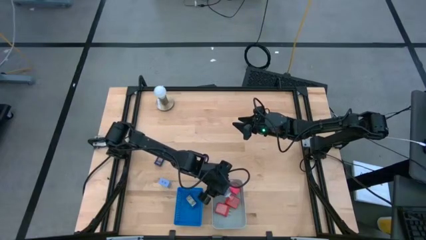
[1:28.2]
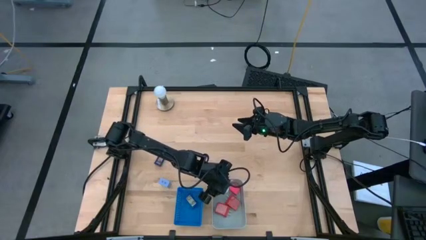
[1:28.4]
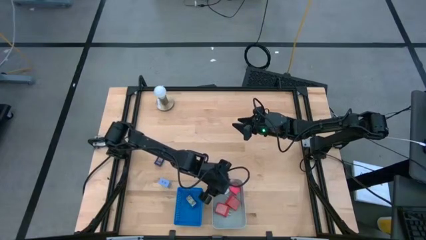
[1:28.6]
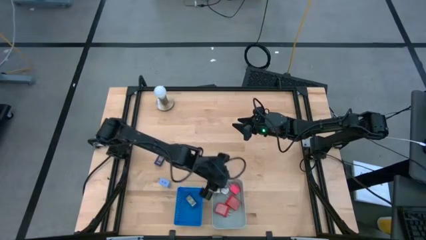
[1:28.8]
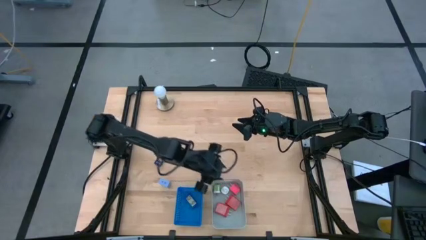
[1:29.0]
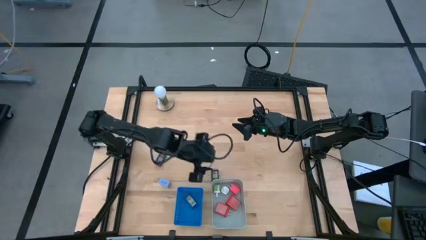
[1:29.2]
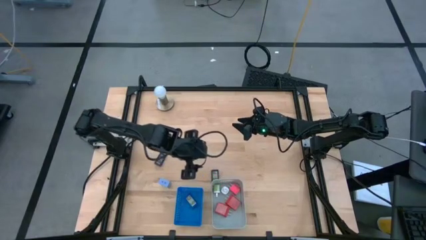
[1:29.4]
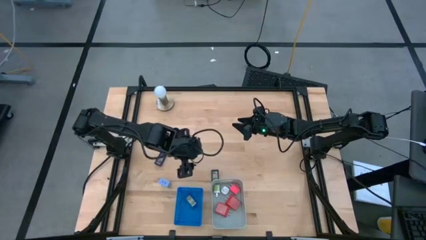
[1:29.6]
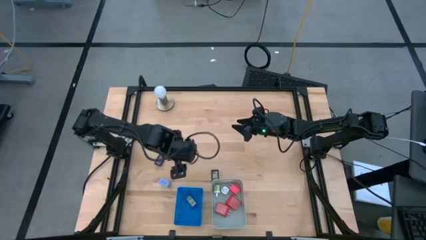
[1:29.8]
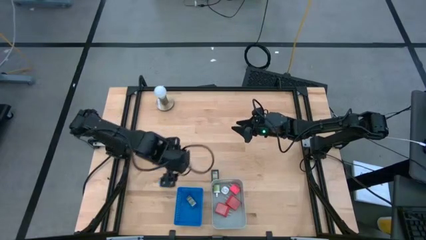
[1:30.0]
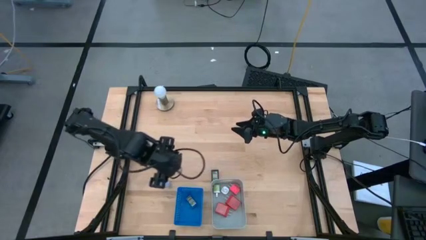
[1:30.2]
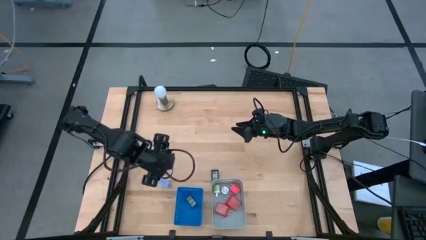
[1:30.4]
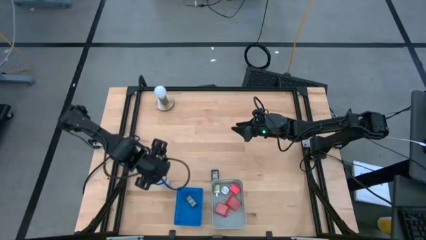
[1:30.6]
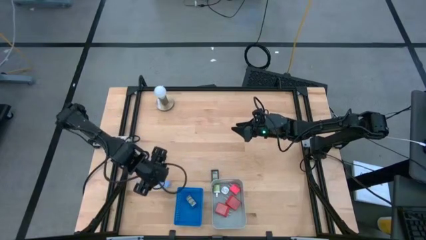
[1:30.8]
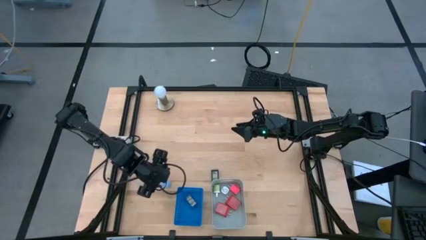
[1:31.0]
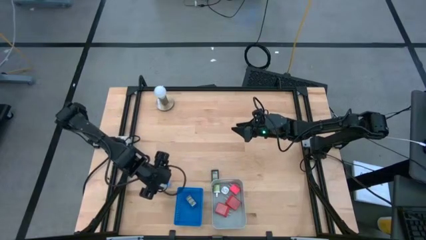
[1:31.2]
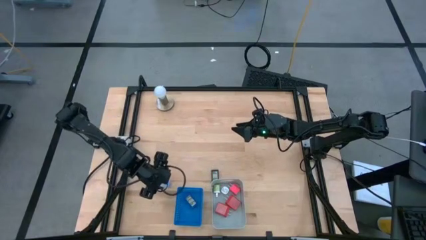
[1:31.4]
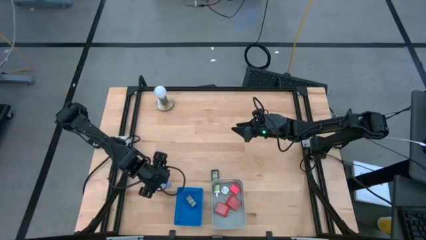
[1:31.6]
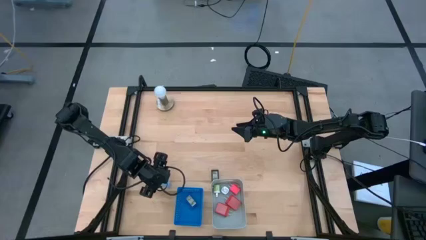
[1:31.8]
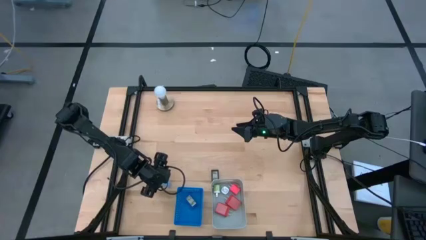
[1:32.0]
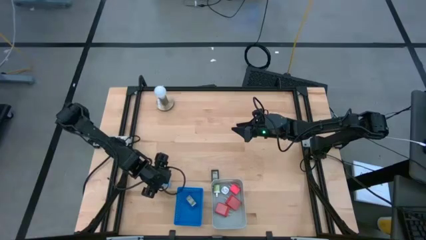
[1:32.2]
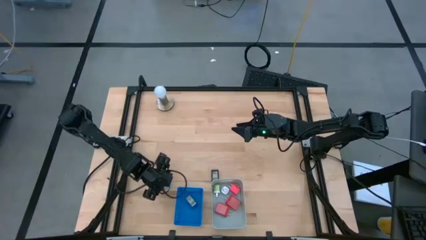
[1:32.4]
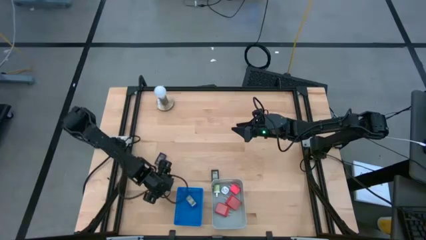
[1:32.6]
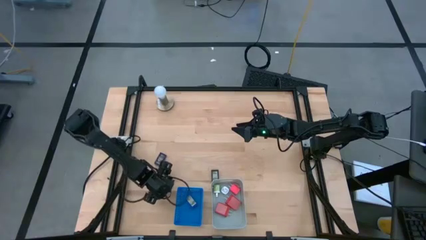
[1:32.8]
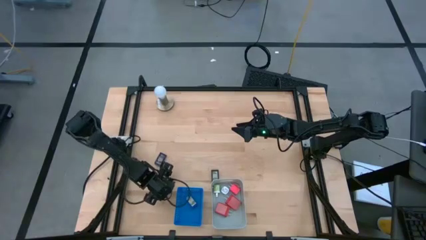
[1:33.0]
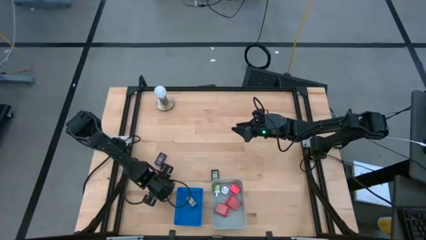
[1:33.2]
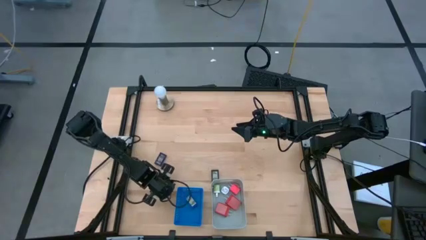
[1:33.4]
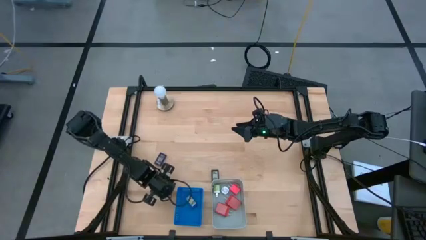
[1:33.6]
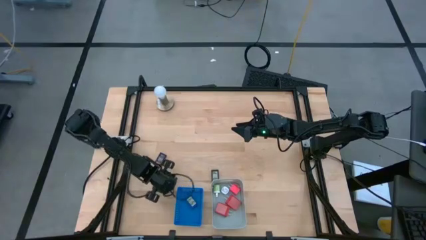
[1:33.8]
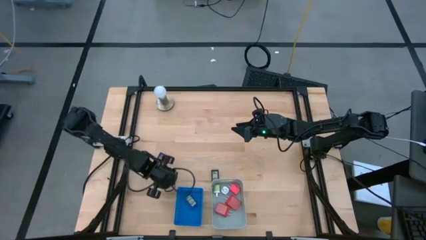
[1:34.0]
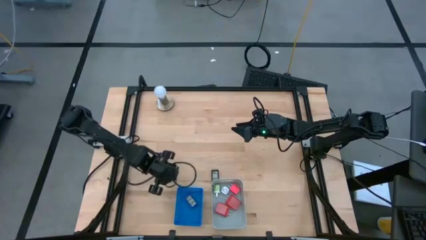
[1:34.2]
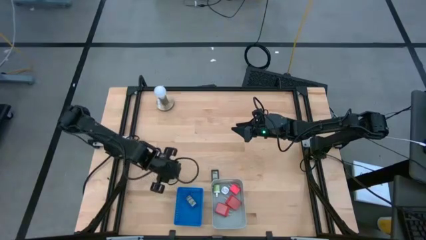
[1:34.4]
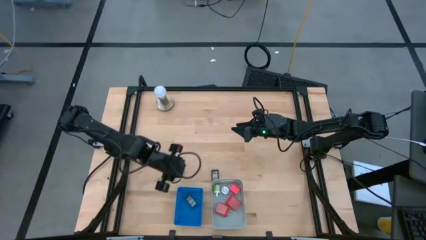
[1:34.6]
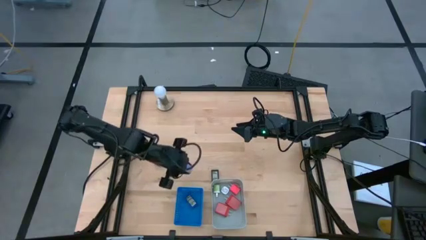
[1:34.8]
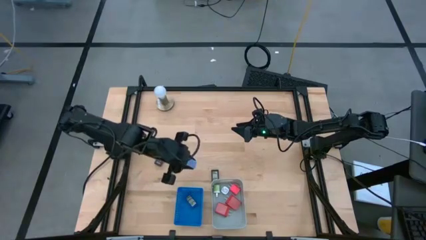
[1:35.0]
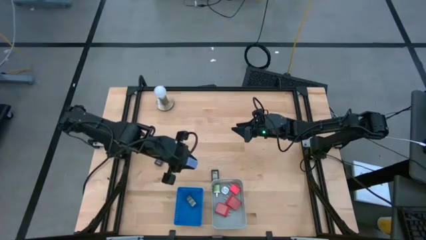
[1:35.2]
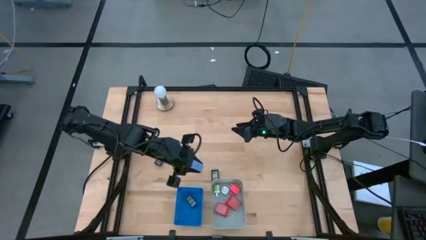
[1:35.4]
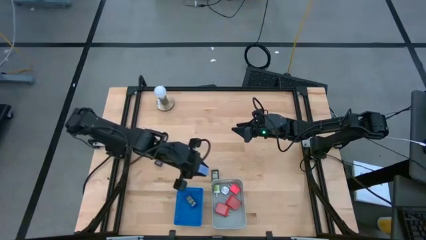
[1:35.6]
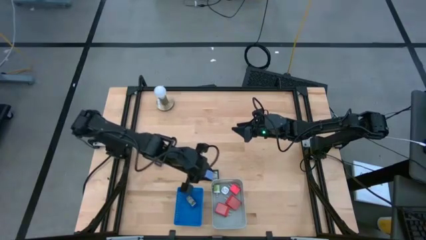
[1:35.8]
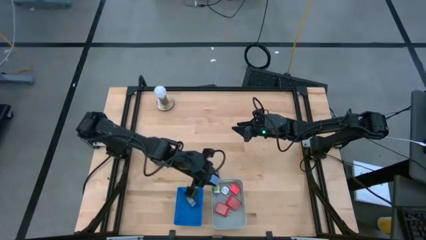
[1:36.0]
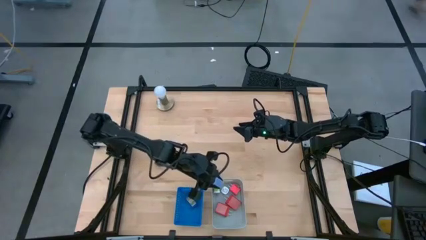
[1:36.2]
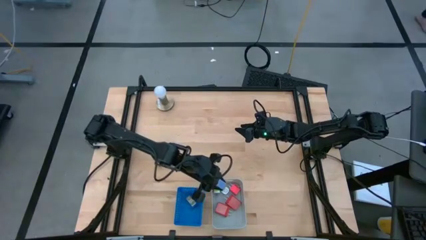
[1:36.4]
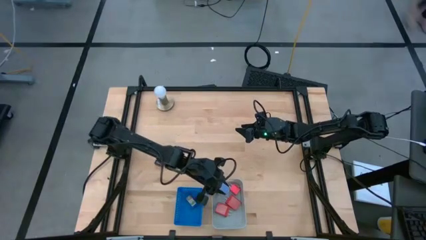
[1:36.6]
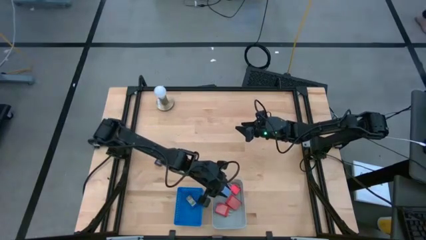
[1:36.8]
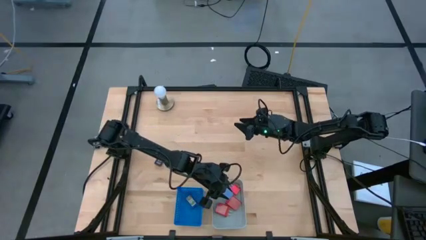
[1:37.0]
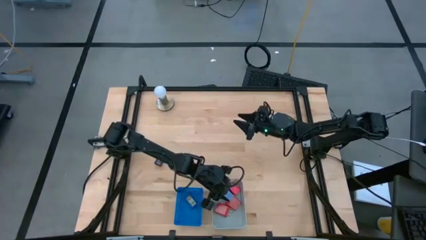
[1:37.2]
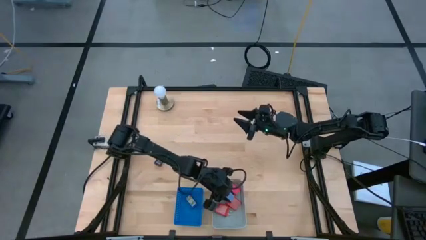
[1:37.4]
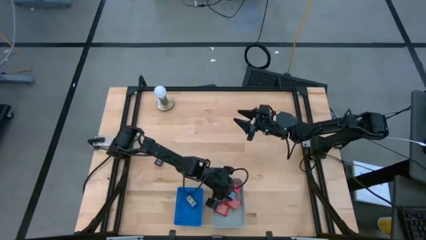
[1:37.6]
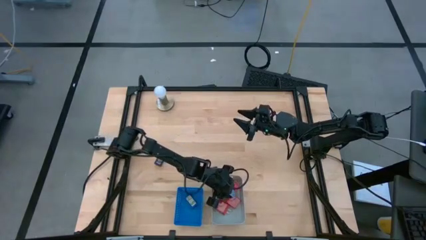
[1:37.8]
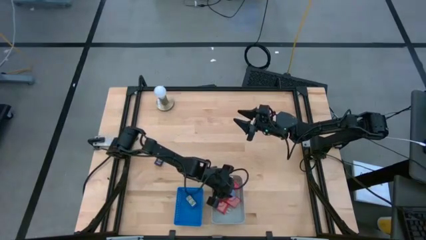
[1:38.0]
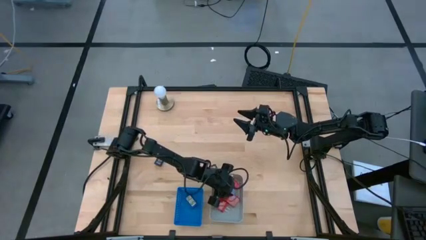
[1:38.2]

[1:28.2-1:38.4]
Task: Pick & Place Office items
Put the blue charger adapter into the gray bin

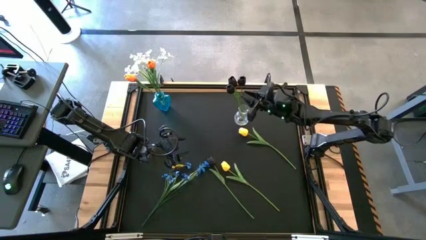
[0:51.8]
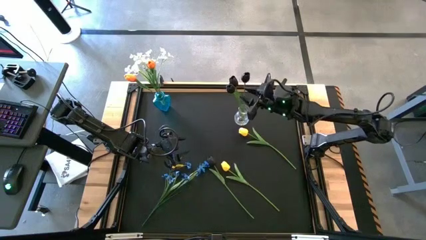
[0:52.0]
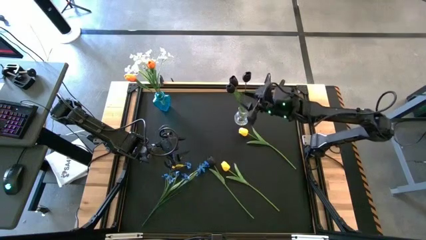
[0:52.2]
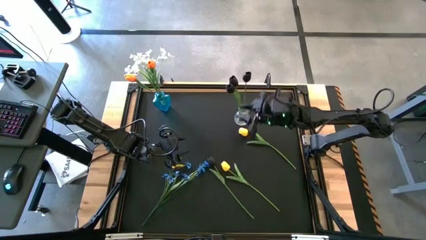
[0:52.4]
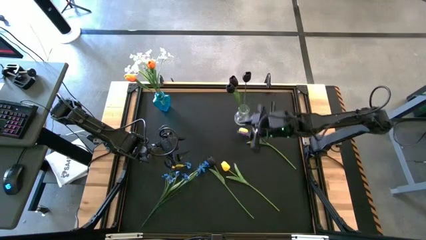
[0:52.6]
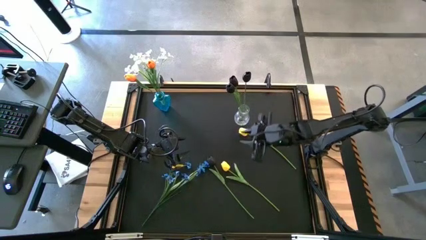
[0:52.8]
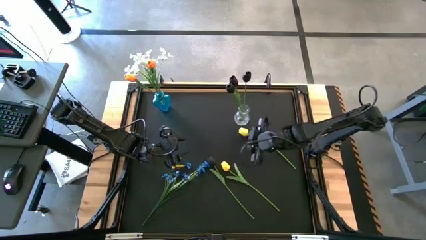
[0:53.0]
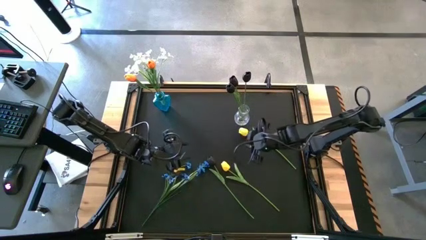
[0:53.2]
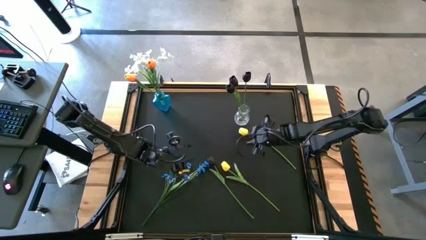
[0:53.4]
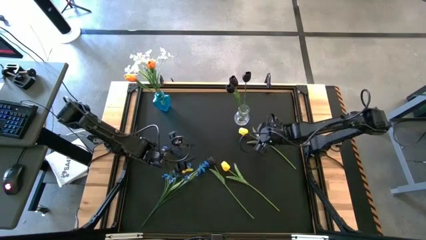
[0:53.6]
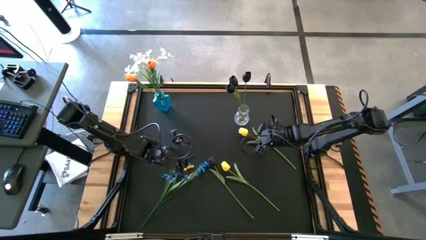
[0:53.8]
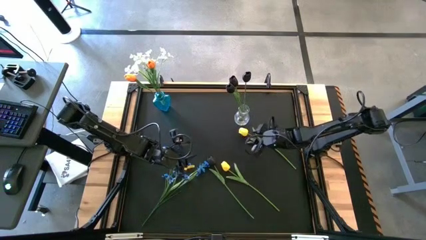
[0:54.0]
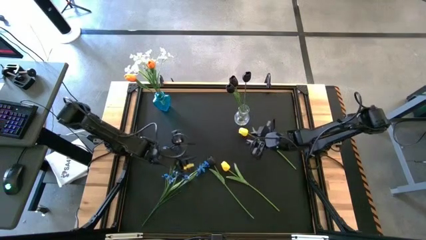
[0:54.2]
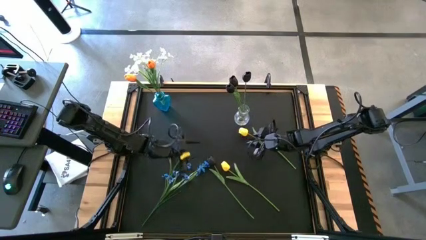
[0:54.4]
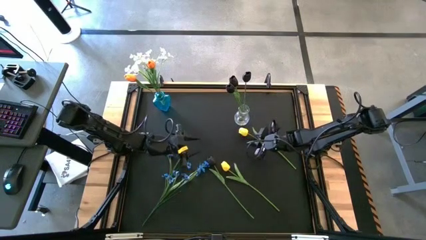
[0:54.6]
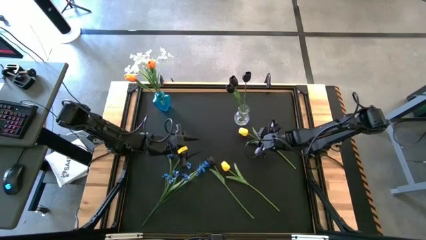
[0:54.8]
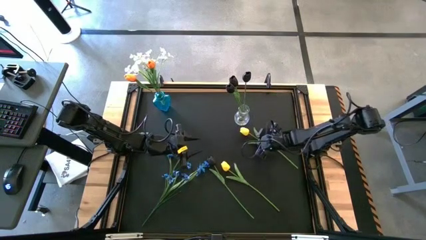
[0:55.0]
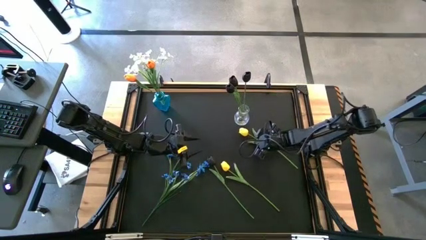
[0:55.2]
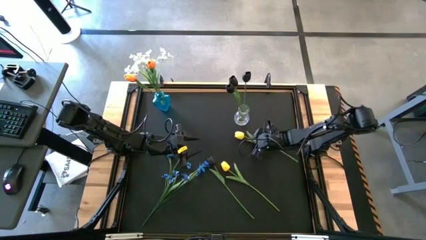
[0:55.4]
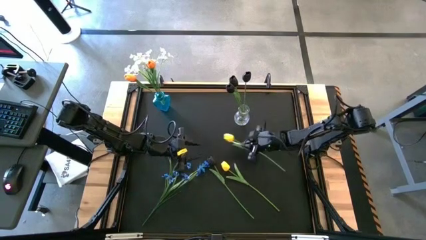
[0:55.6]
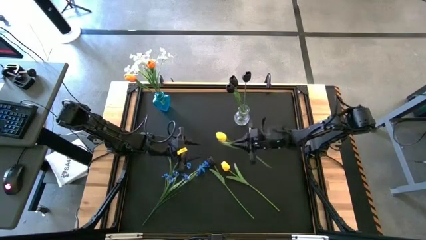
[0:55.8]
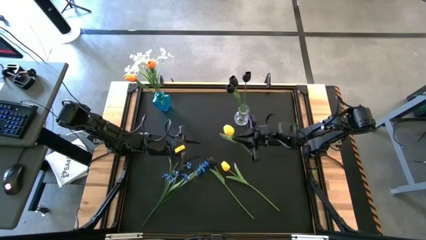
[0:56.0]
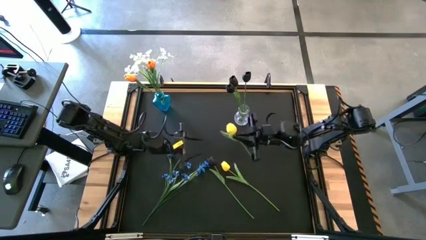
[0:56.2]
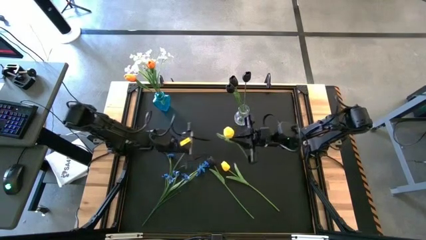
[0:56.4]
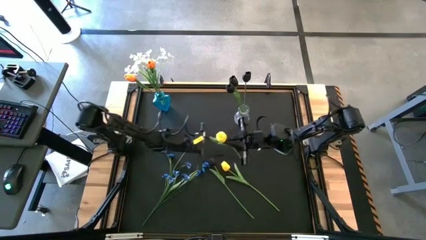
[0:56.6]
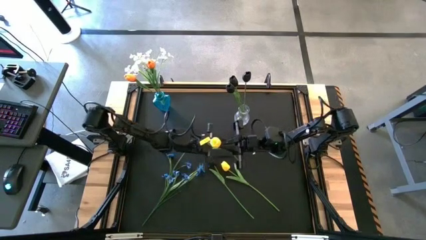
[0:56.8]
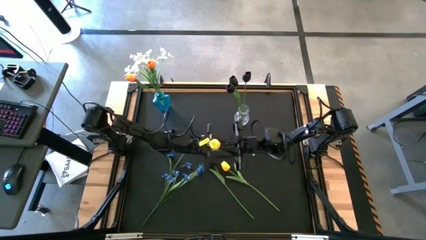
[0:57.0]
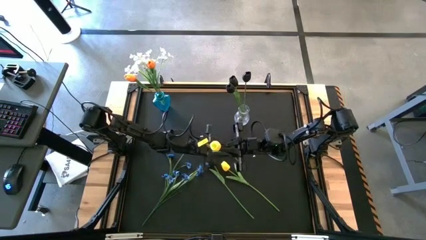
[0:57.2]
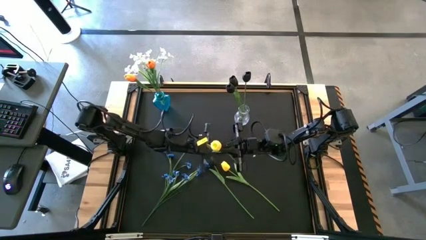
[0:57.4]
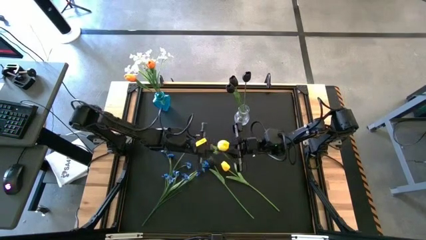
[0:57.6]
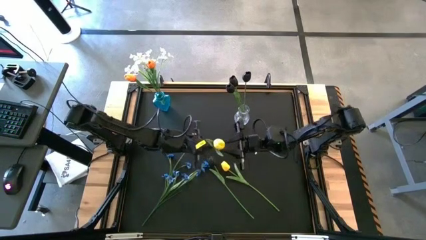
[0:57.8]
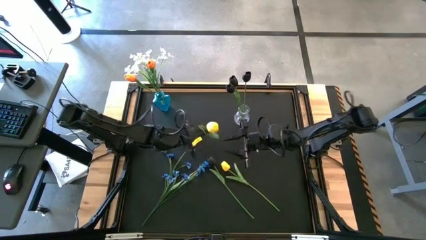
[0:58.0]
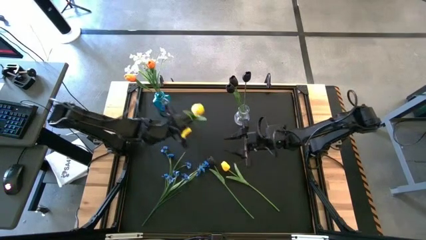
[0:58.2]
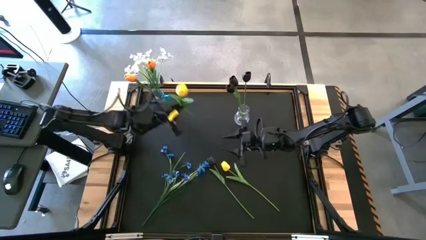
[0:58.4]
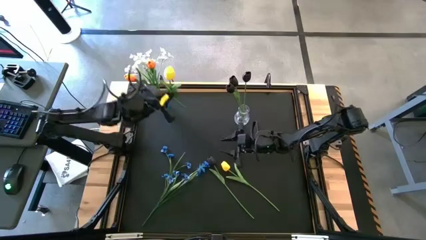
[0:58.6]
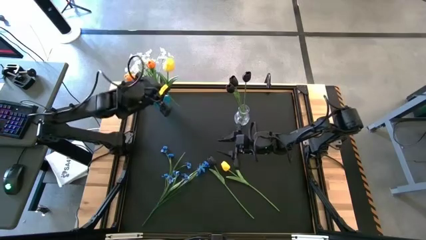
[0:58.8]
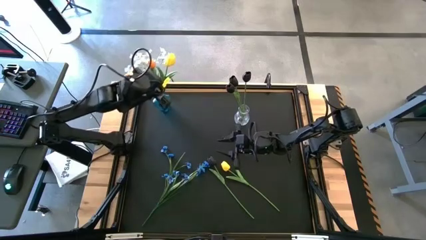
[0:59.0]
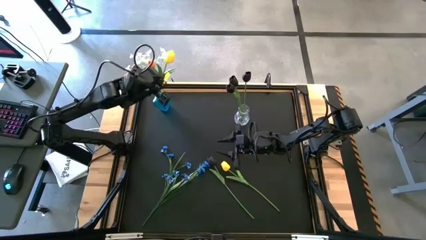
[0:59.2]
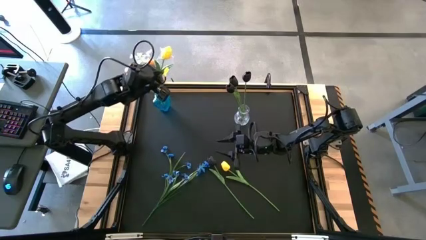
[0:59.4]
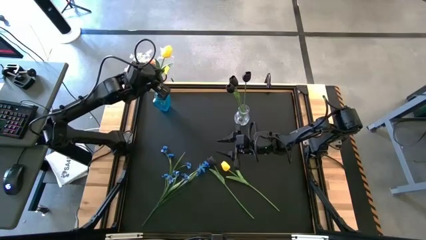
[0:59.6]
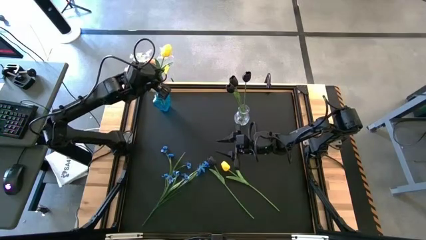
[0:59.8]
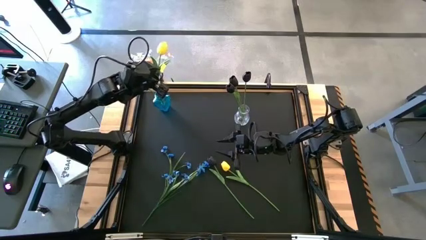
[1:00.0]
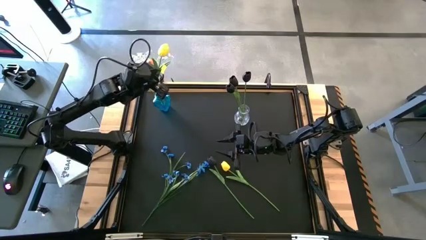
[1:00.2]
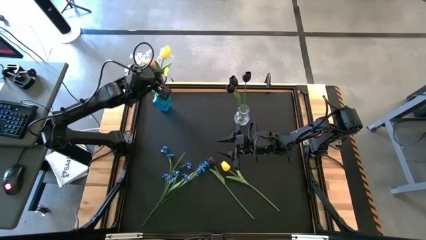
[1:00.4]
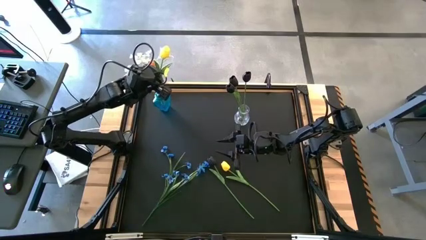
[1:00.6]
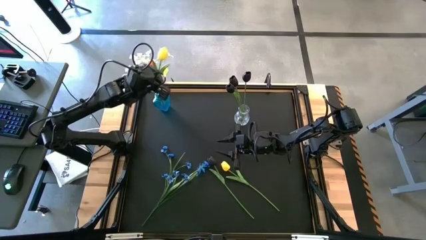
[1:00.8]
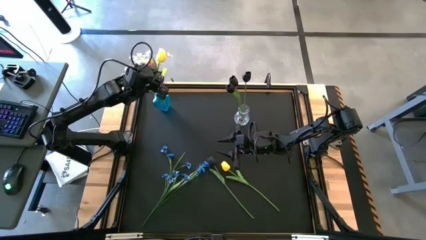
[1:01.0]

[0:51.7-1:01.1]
Task: Sort flowers into vase by color
Put the top yellow flower into the blue vase
